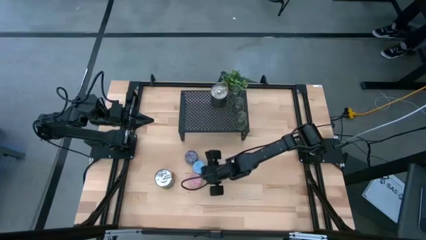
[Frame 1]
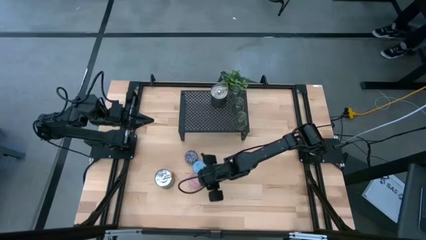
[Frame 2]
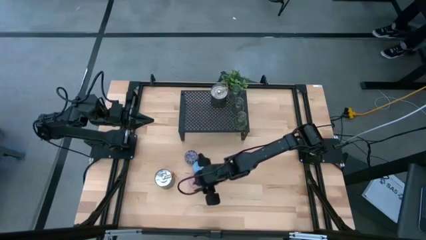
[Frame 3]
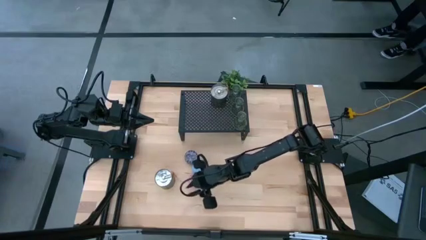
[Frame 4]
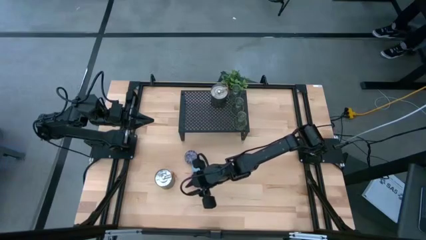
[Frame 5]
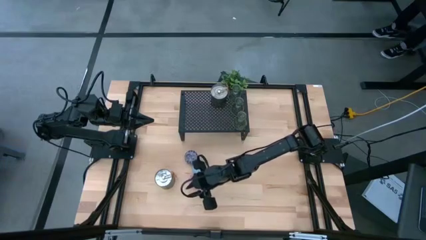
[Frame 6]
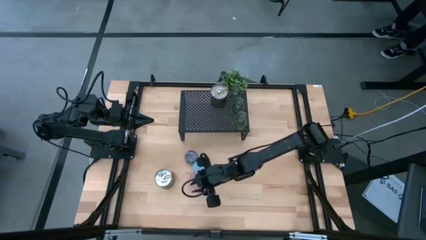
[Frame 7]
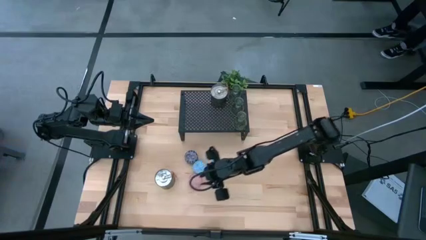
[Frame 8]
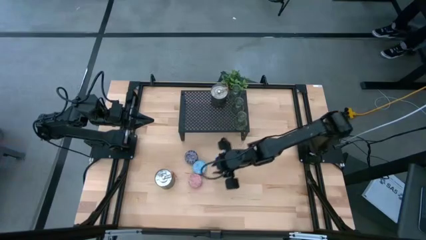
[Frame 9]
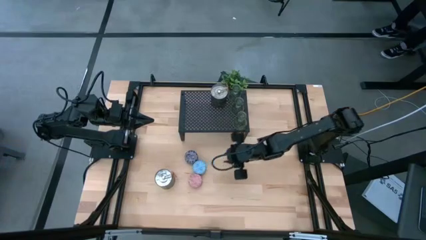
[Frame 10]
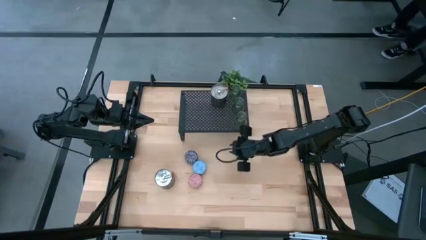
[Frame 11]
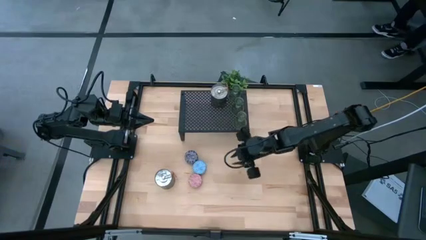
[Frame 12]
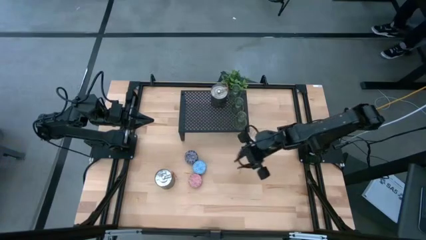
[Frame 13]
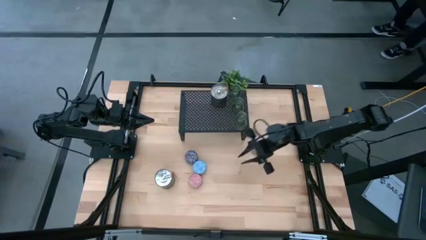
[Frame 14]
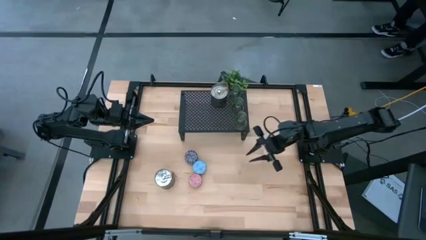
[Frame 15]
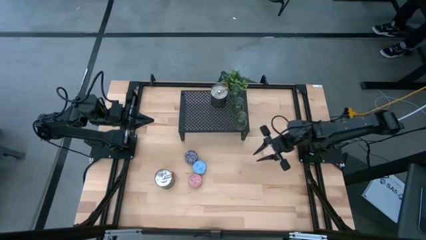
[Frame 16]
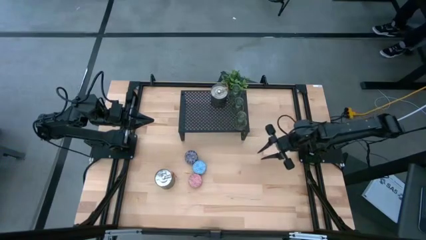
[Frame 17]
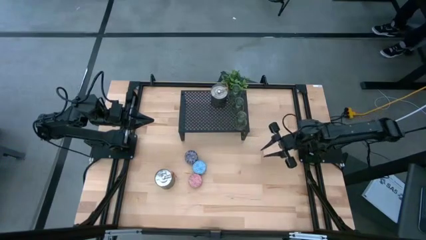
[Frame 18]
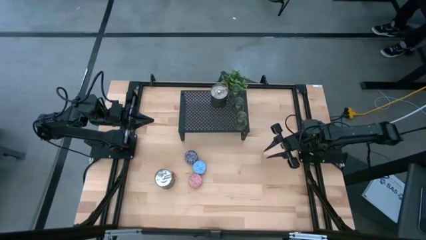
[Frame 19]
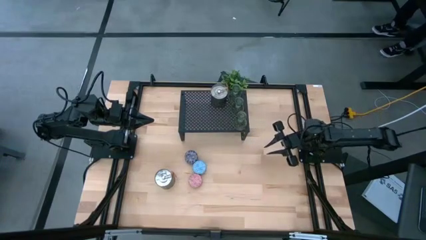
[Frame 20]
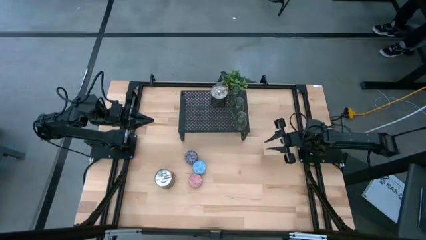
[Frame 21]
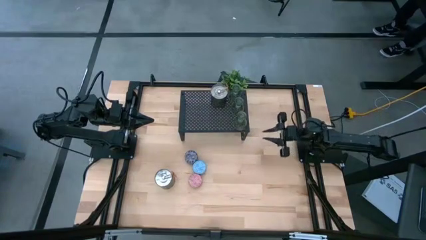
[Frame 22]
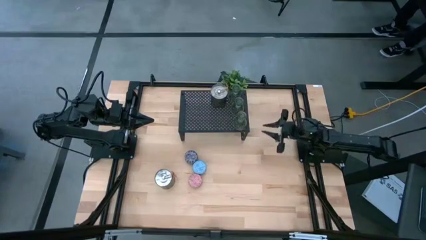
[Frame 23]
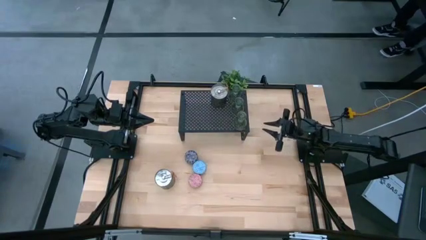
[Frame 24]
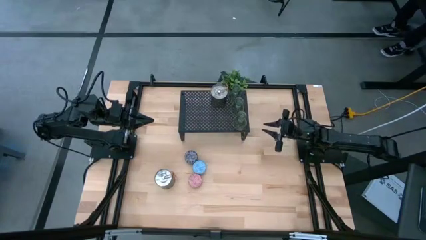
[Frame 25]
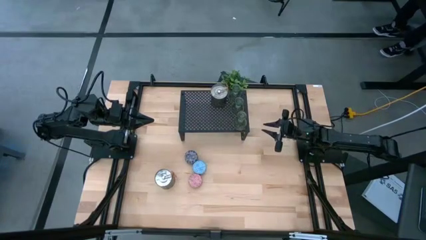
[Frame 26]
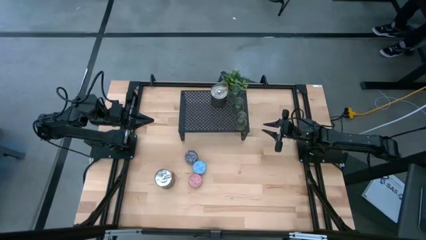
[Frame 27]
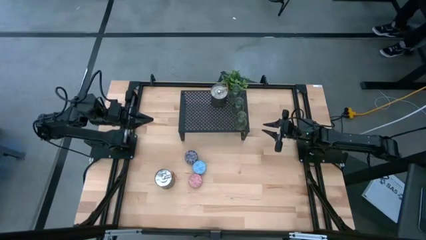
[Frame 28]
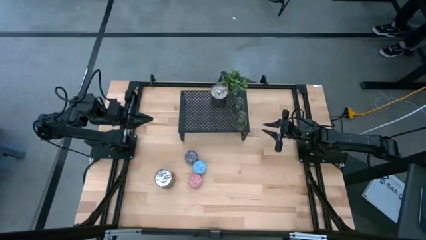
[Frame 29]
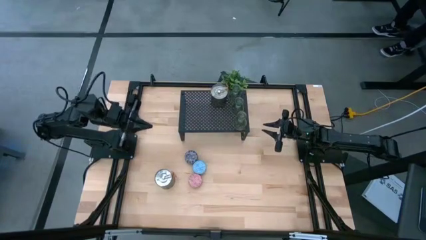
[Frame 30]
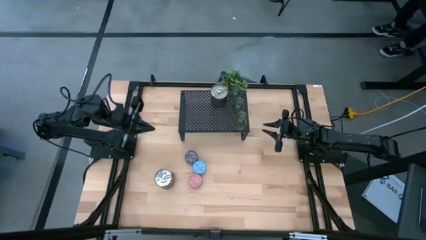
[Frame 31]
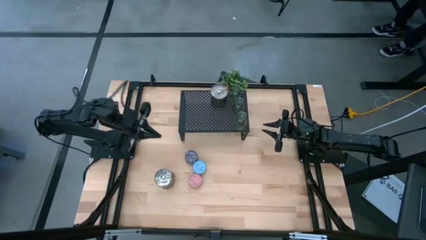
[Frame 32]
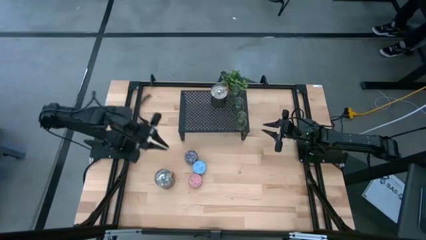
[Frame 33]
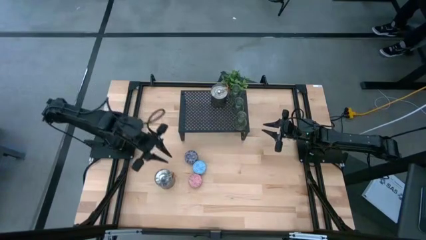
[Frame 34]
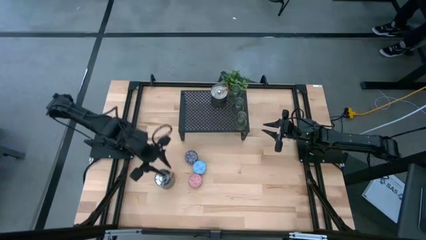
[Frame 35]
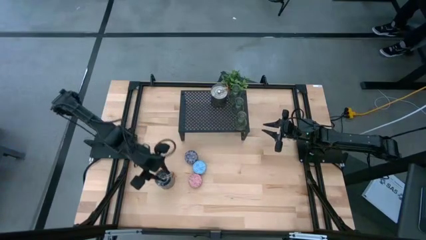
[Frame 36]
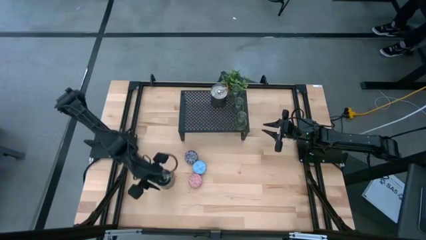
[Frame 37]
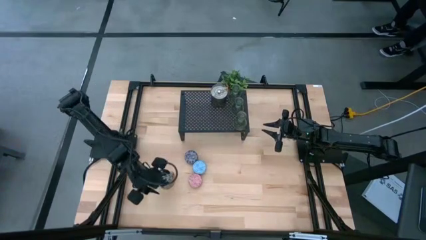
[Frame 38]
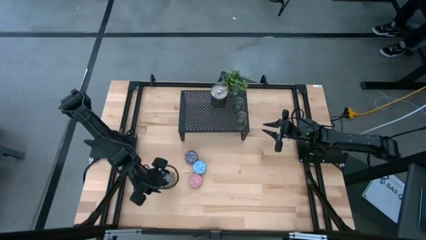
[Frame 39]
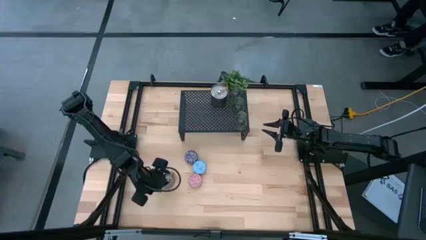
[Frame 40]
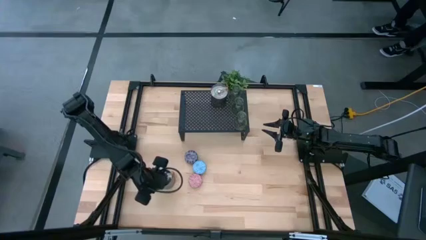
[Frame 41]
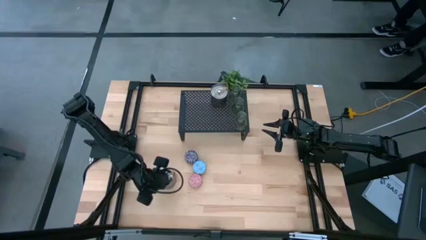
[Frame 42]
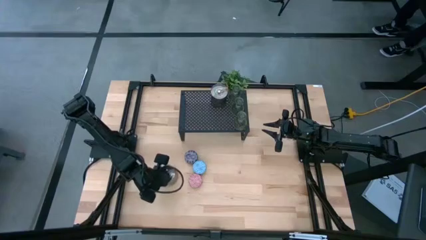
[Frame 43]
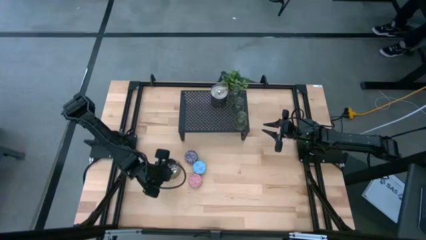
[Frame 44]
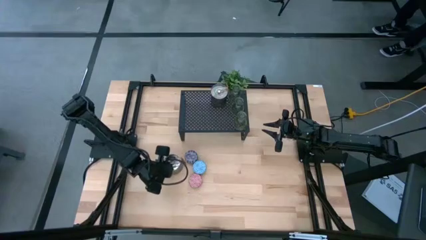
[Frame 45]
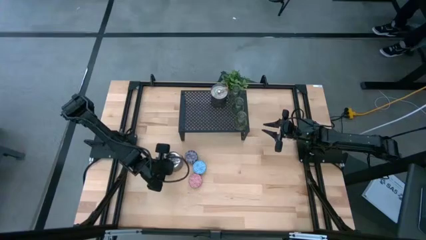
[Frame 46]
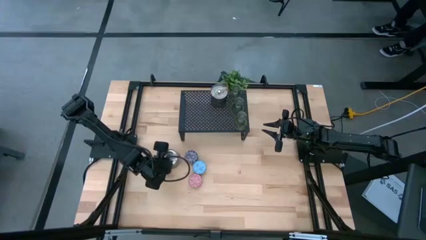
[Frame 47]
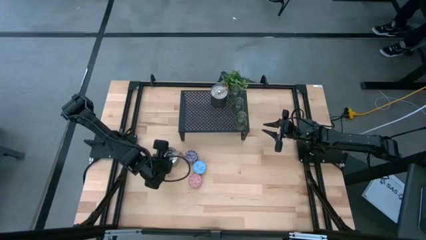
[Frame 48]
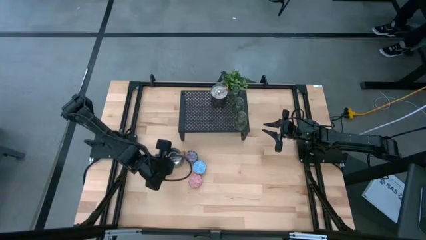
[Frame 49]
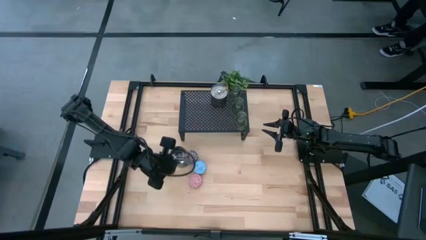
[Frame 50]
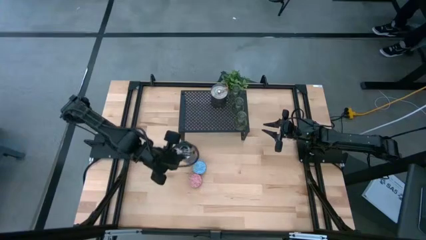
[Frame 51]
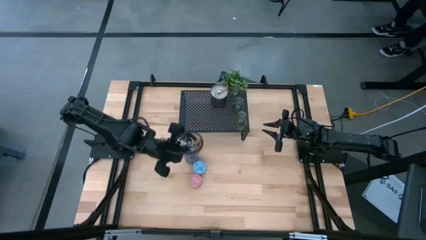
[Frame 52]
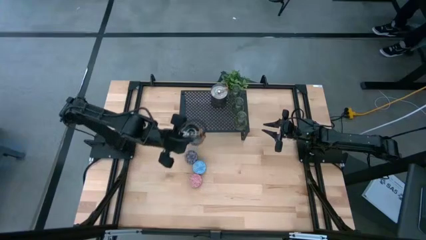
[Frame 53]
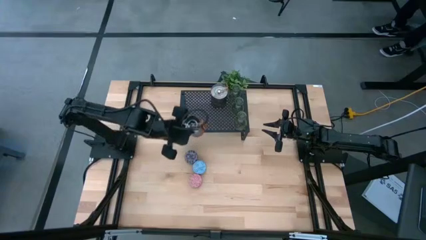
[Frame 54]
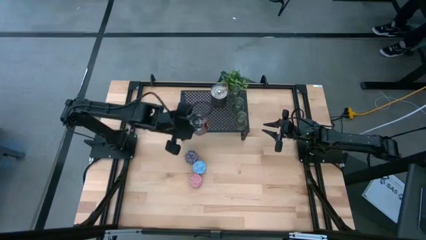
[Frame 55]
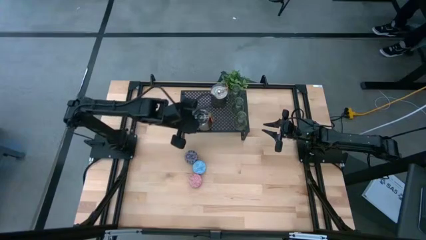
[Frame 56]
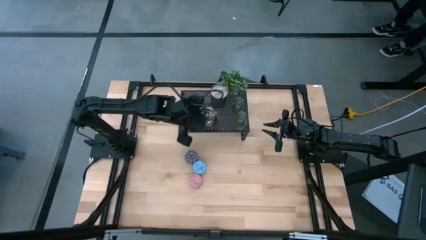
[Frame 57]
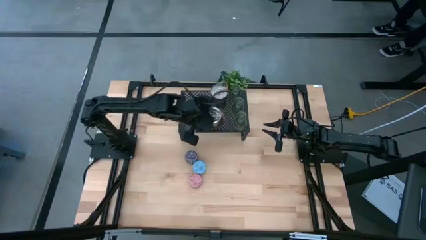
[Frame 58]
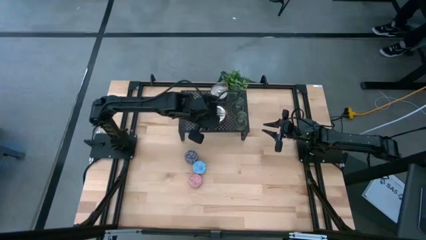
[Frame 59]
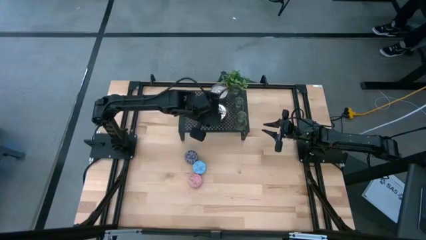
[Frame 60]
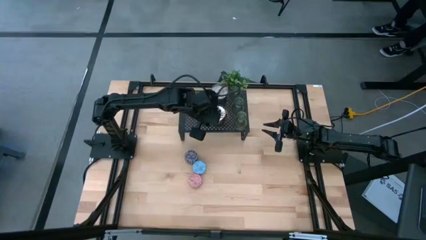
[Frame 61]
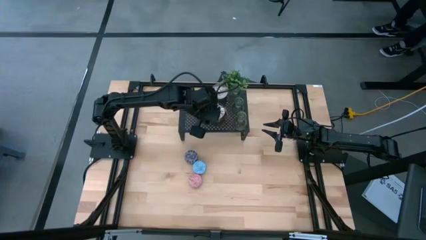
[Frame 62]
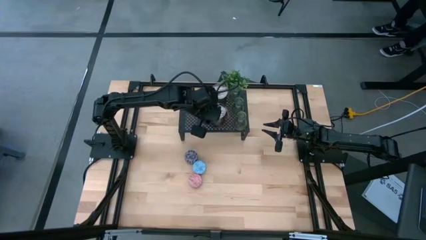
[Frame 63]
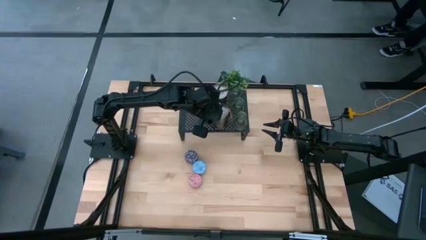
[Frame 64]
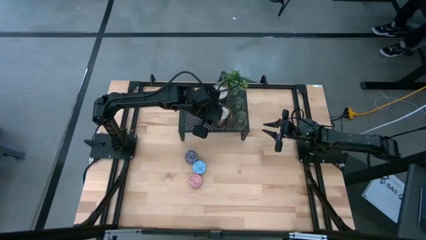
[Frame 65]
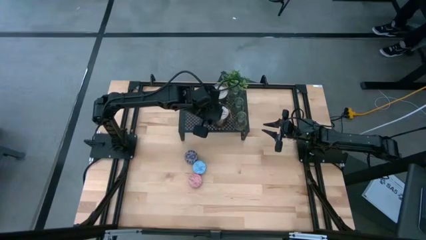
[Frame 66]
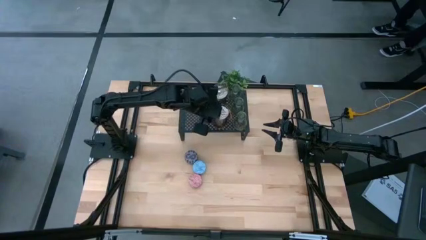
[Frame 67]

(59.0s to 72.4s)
Task: Pick & Place candle stick holders
Put the silver scented candle aligned with the other silver scented candle on the shelf

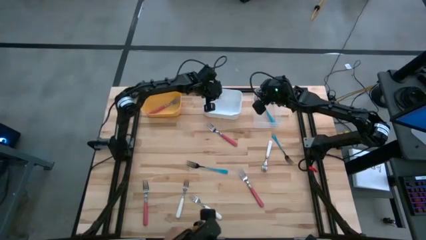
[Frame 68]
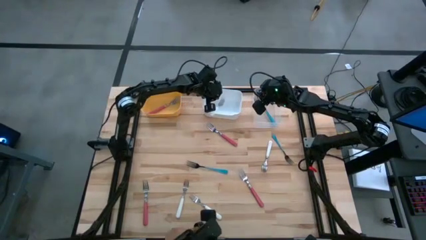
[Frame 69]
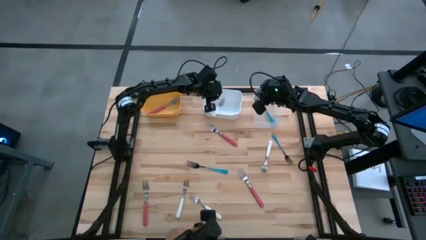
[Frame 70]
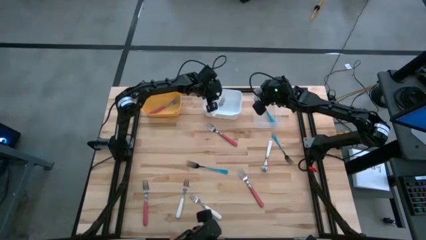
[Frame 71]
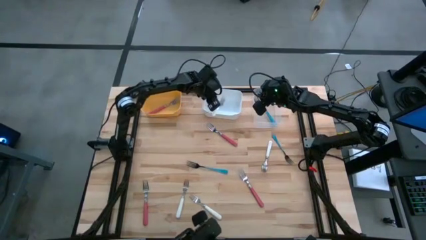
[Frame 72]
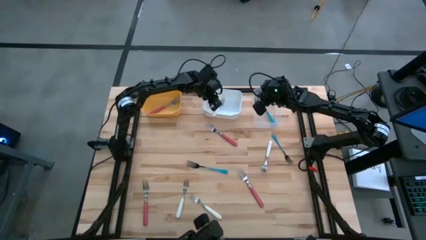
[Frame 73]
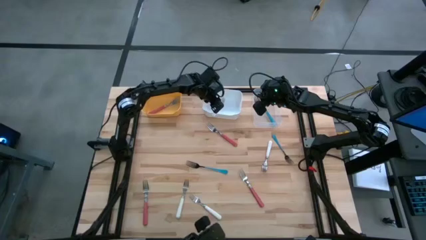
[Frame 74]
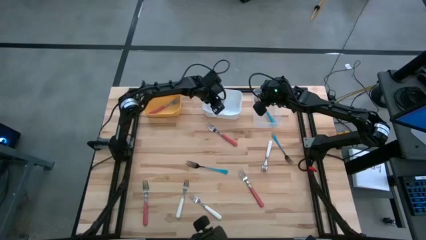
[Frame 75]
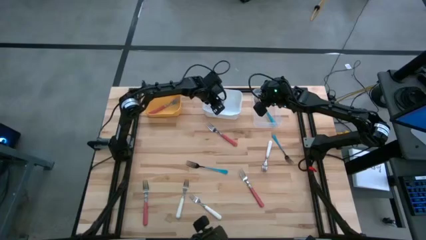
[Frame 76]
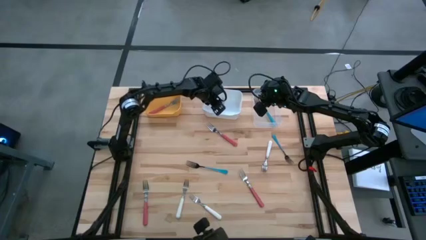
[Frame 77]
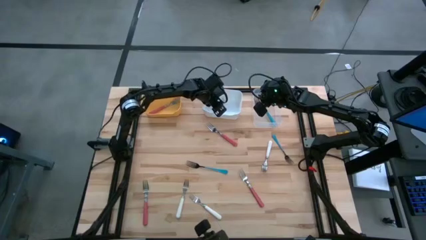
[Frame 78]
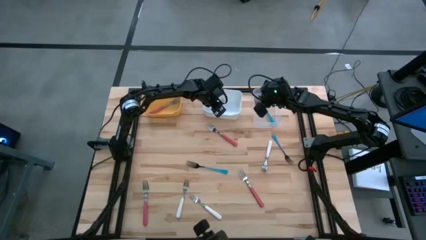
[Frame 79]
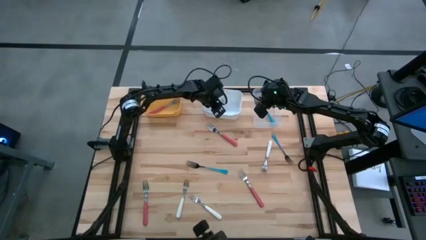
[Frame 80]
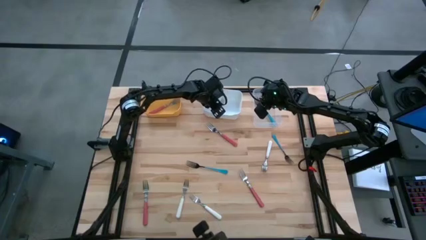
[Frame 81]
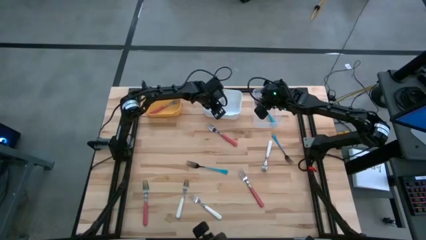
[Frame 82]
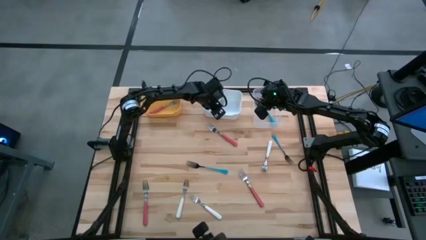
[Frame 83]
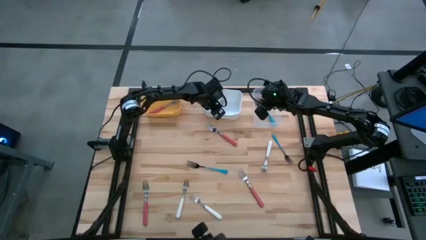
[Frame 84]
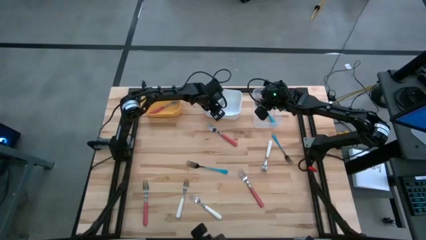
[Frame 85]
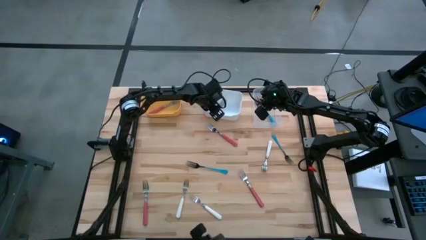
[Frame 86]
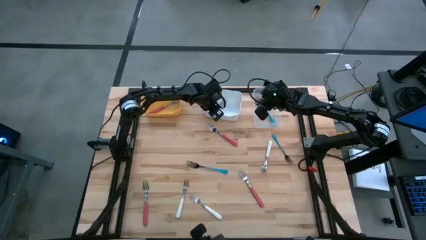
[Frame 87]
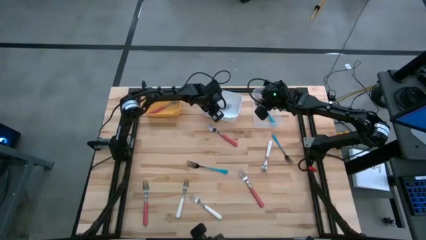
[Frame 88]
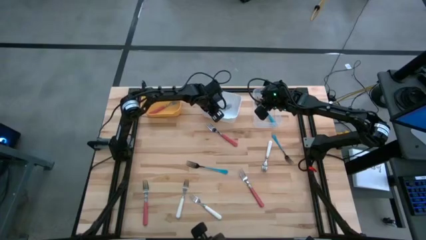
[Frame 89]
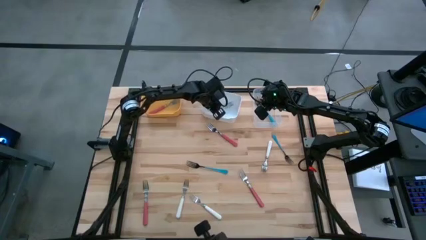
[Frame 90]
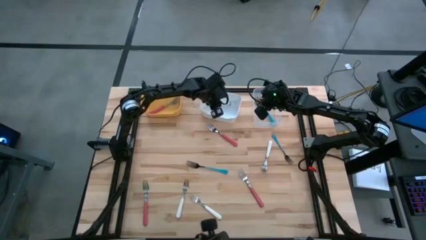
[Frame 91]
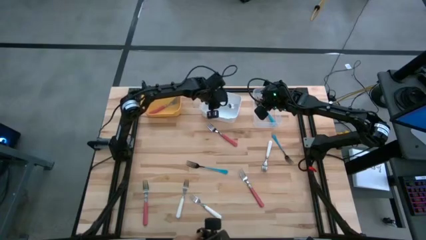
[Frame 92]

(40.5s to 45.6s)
Task: Sort silverware by color (type)
Put the white fork into the white bin
